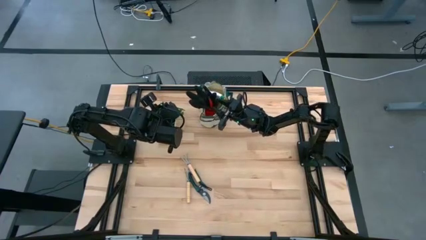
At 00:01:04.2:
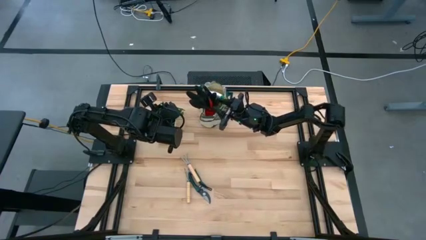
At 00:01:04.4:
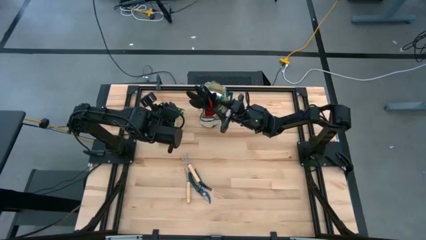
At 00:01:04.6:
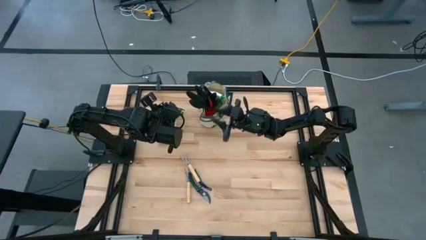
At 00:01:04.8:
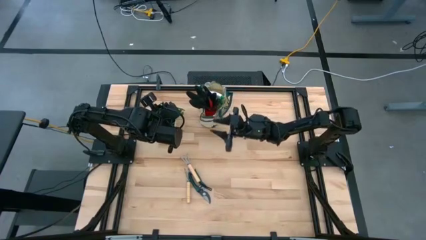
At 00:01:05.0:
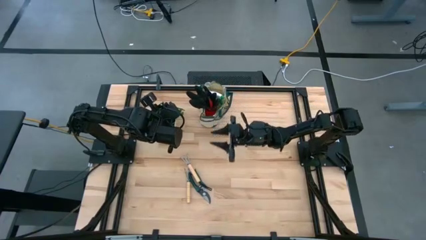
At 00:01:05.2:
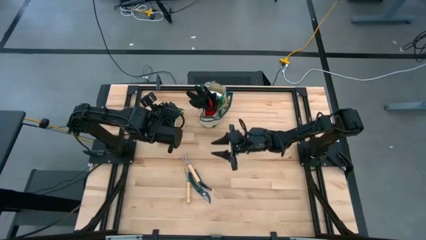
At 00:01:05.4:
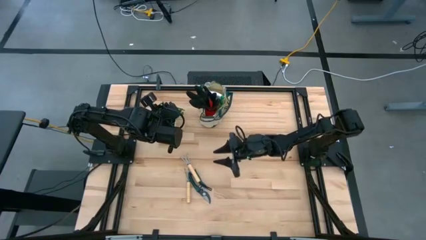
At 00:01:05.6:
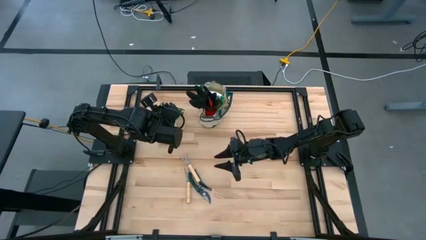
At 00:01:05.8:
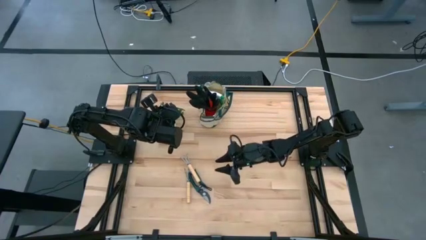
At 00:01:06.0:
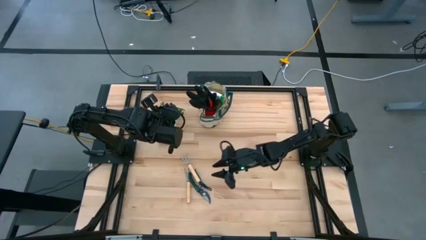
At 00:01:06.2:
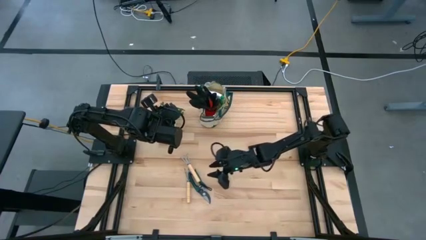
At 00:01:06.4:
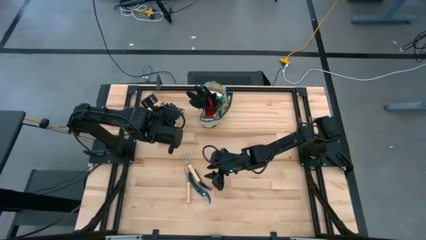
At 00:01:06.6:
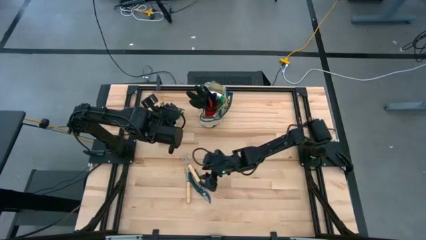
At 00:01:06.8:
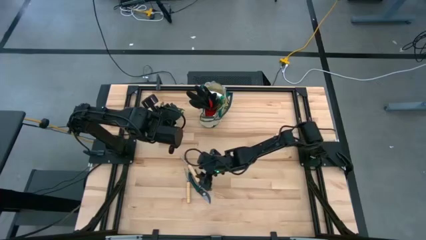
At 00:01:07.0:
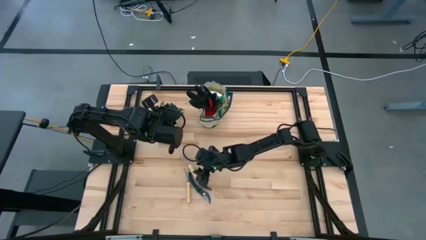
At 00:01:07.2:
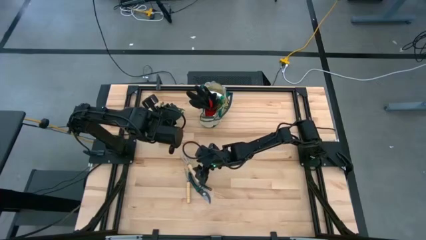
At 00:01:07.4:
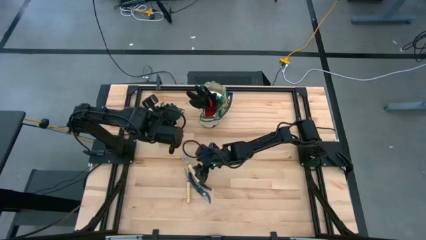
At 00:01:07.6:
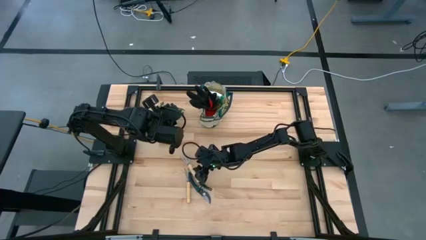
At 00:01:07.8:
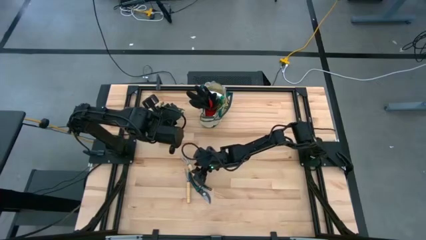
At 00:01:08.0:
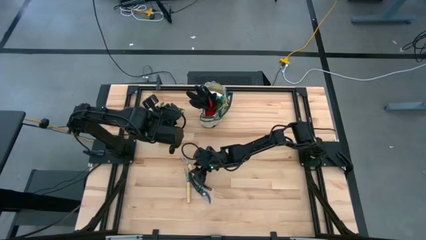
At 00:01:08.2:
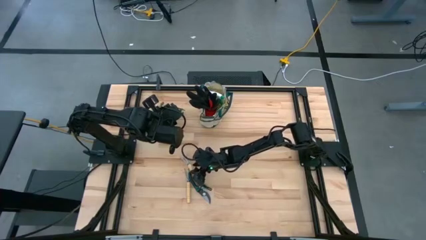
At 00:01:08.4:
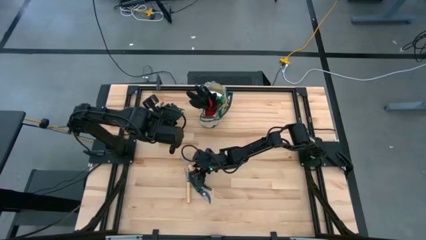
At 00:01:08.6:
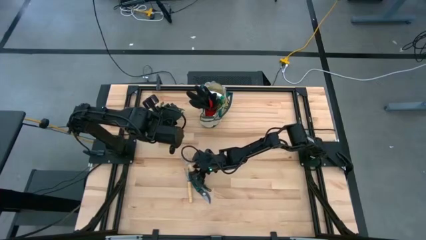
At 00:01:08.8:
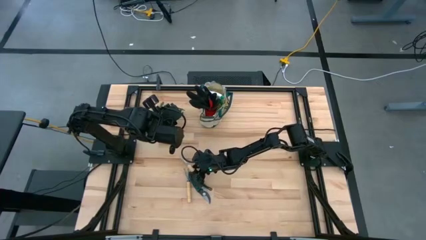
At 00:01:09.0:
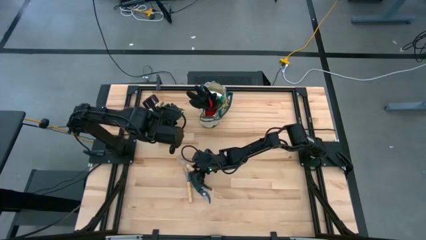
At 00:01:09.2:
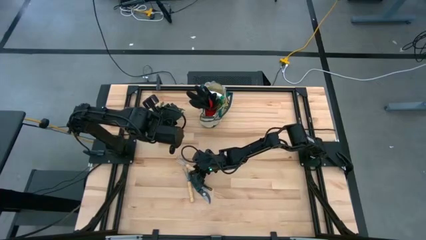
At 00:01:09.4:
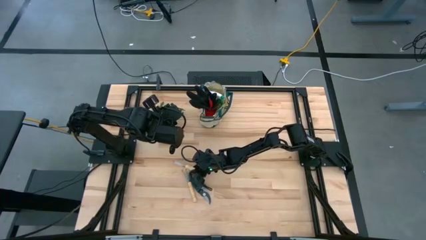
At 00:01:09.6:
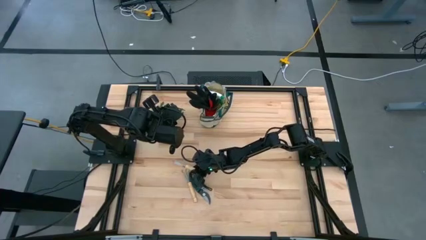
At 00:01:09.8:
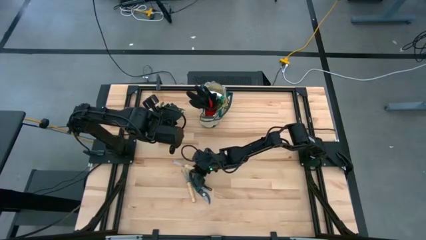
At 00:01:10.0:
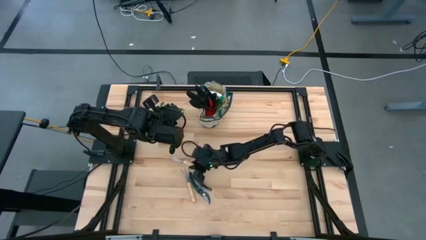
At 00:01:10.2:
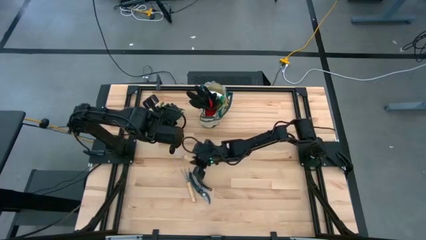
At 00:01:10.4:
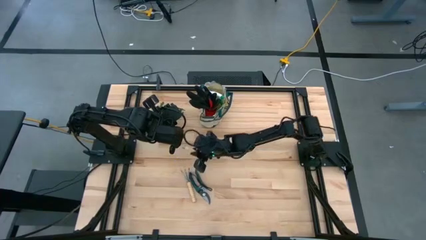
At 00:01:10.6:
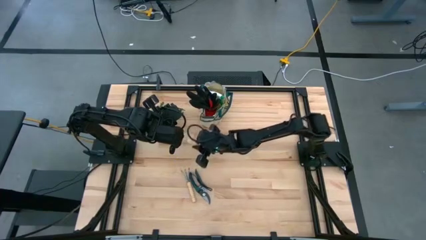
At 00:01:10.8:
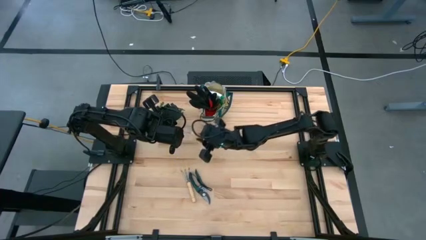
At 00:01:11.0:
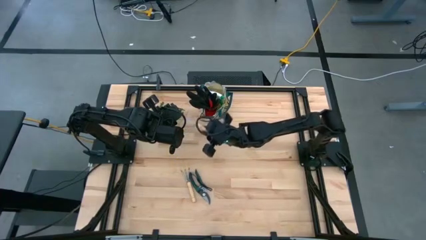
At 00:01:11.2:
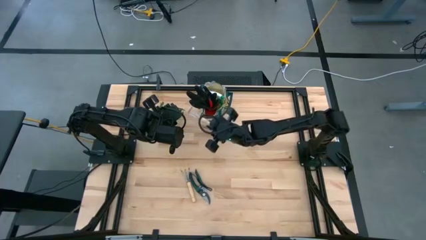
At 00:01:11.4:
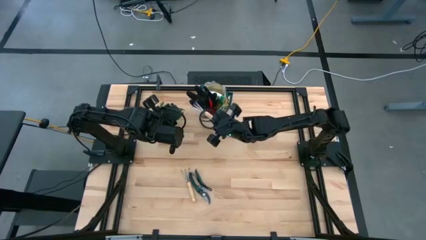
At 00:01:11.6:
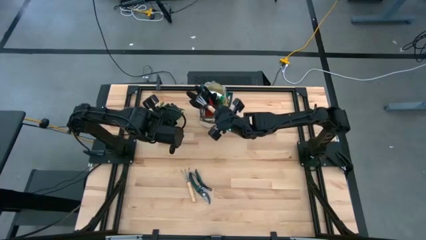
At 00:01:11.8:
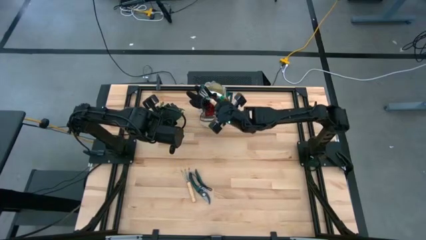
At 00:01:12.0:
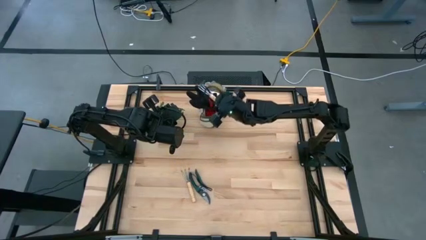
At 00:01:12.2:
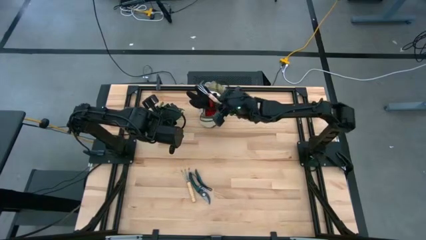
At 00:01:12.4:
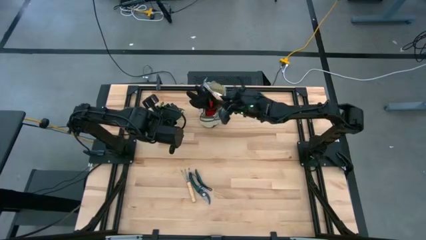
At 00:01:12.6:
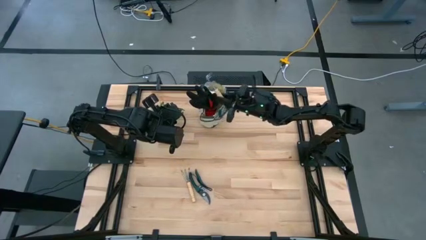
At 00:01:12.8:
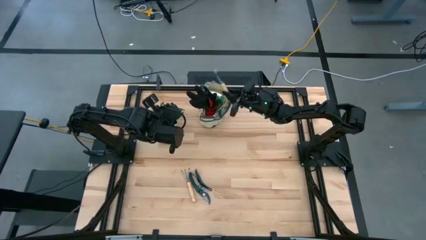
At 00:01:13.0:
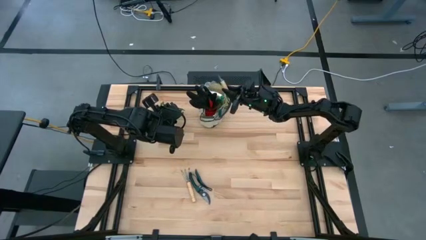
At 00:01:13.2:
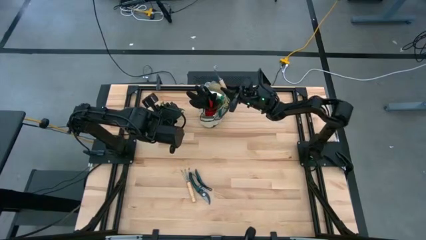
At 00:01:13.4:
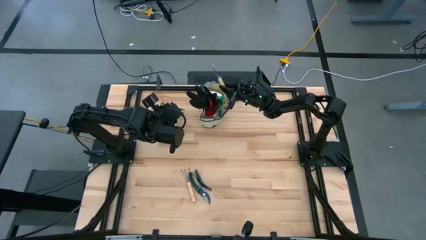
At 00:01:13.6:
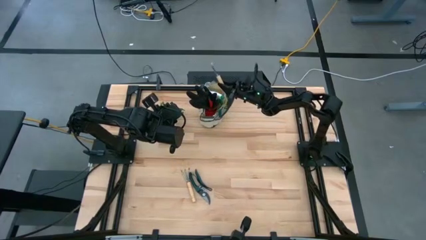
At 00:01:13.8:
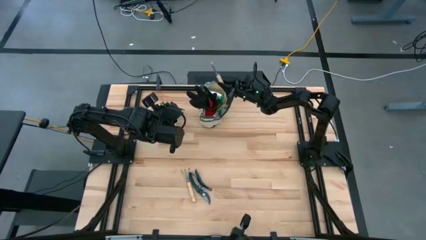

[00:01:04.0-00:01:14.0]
Task: Pick & Place Garden tools in Gardening bag
Put the top brown hand rake into the white gardening bag
